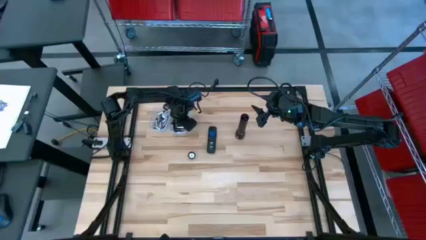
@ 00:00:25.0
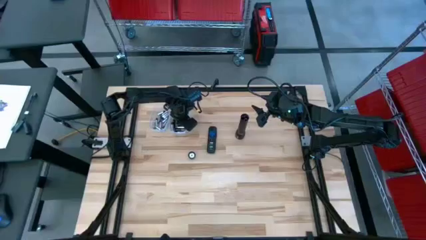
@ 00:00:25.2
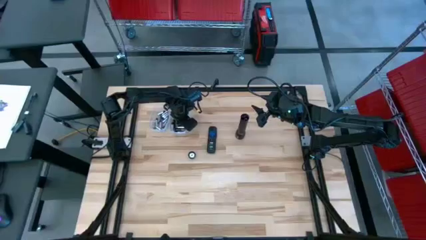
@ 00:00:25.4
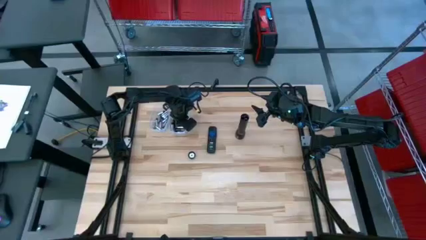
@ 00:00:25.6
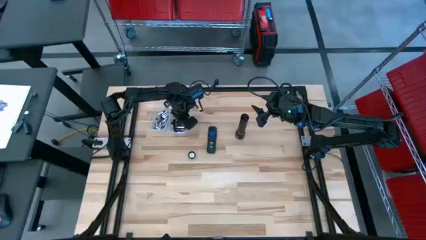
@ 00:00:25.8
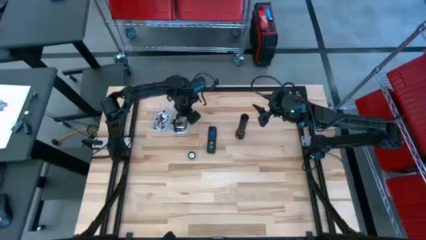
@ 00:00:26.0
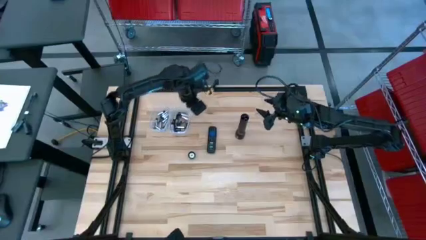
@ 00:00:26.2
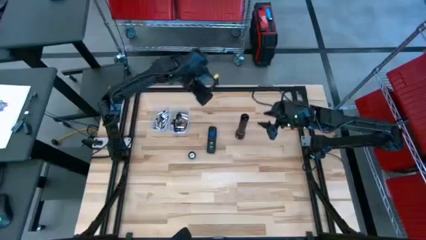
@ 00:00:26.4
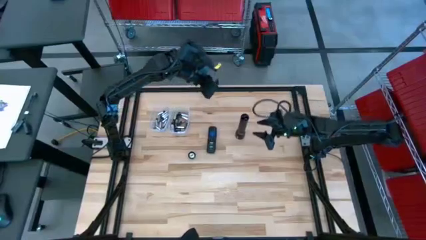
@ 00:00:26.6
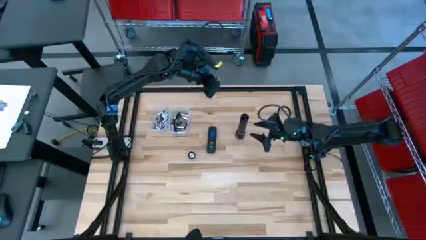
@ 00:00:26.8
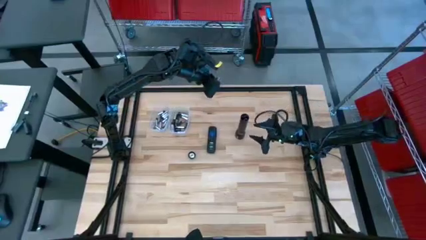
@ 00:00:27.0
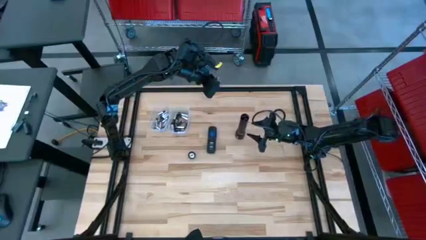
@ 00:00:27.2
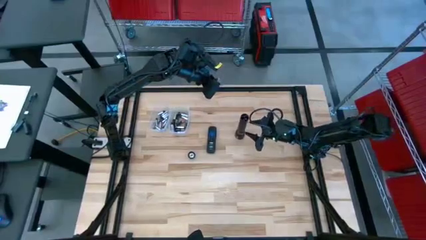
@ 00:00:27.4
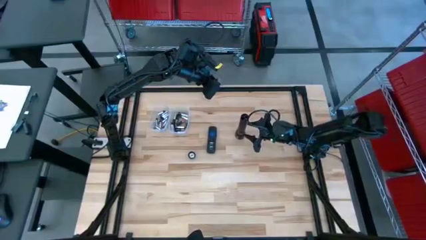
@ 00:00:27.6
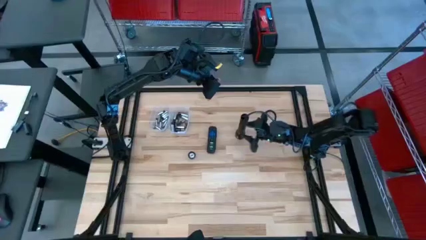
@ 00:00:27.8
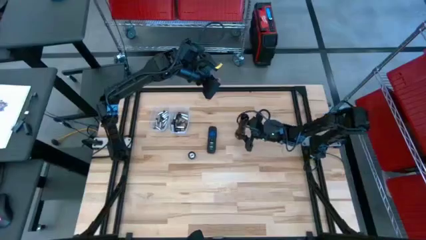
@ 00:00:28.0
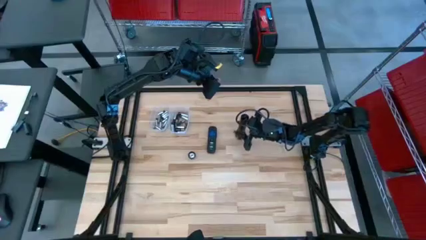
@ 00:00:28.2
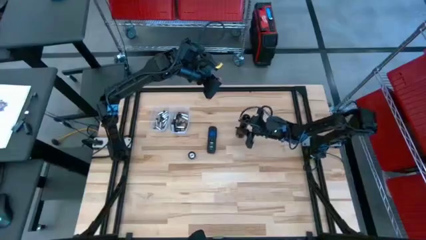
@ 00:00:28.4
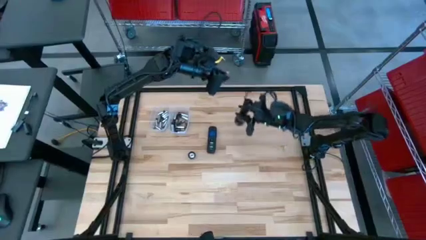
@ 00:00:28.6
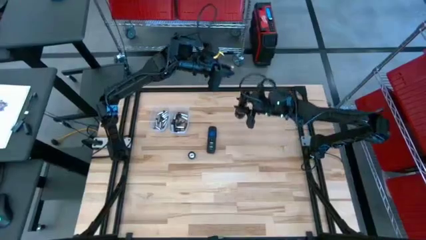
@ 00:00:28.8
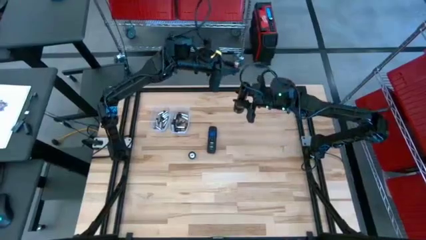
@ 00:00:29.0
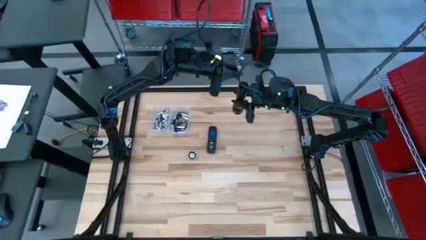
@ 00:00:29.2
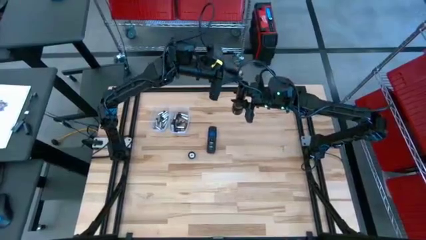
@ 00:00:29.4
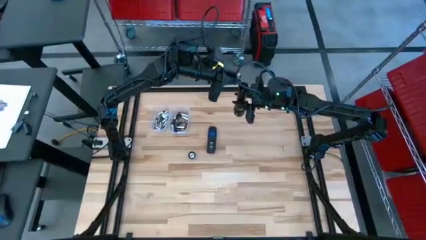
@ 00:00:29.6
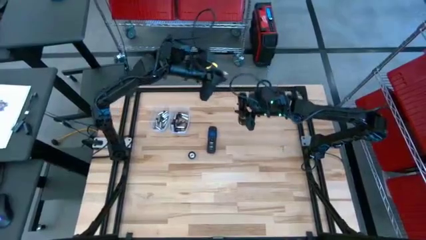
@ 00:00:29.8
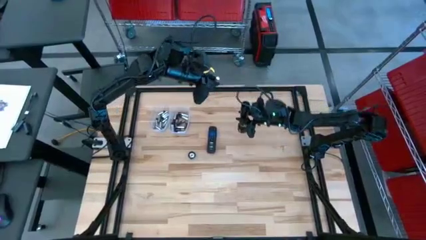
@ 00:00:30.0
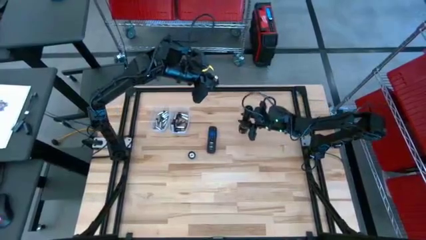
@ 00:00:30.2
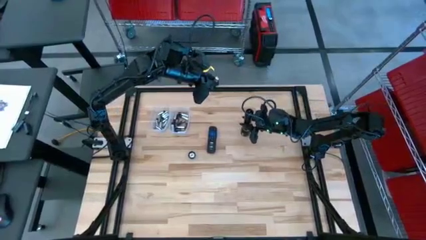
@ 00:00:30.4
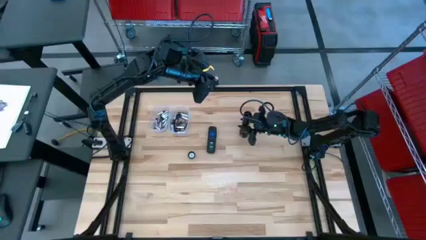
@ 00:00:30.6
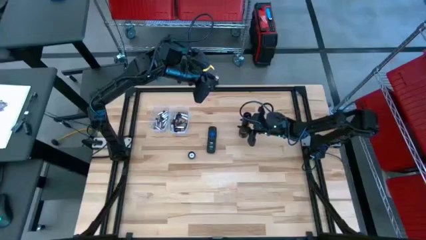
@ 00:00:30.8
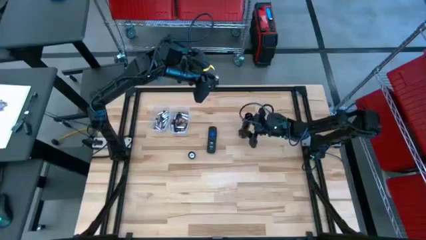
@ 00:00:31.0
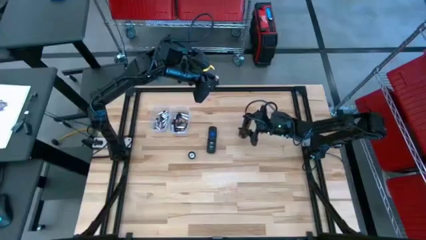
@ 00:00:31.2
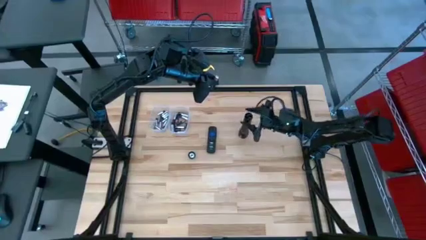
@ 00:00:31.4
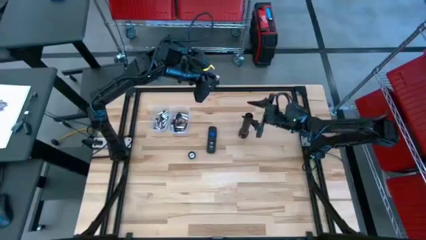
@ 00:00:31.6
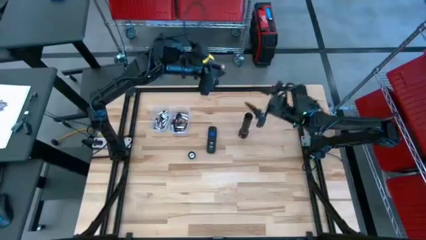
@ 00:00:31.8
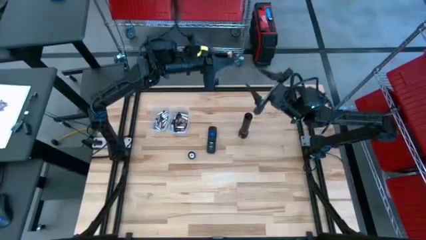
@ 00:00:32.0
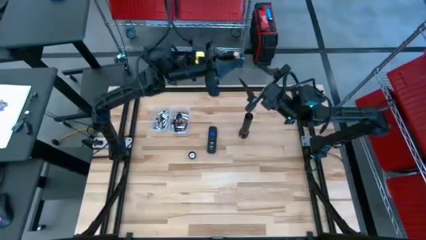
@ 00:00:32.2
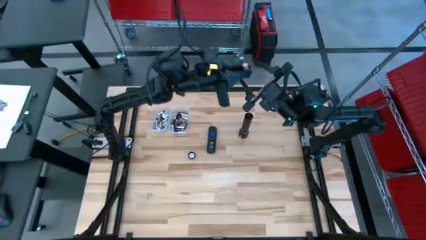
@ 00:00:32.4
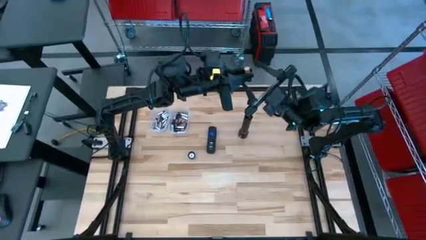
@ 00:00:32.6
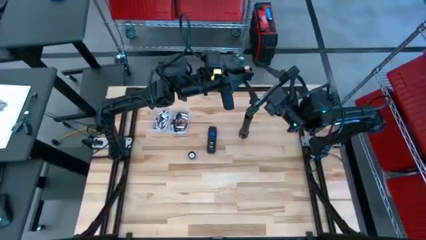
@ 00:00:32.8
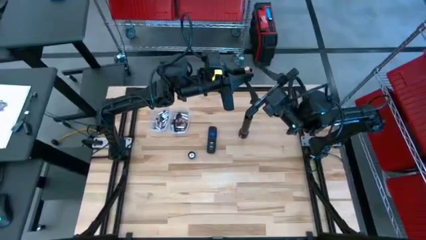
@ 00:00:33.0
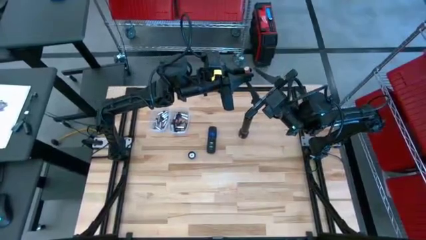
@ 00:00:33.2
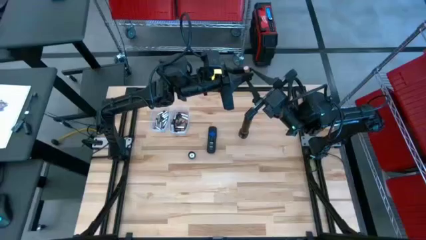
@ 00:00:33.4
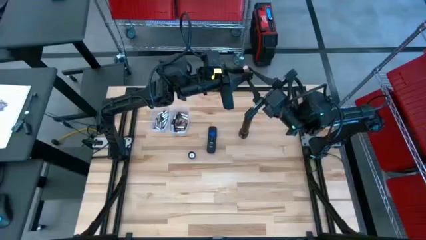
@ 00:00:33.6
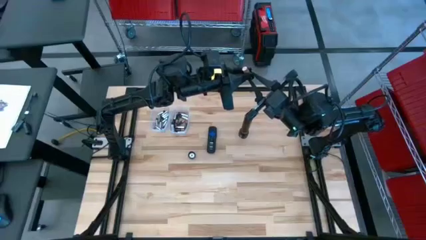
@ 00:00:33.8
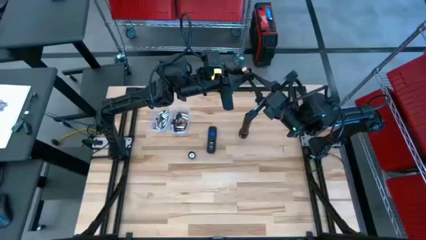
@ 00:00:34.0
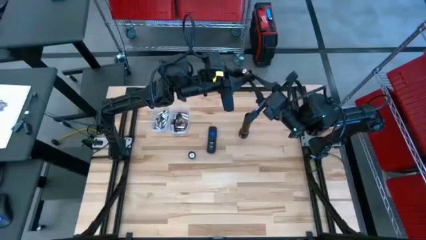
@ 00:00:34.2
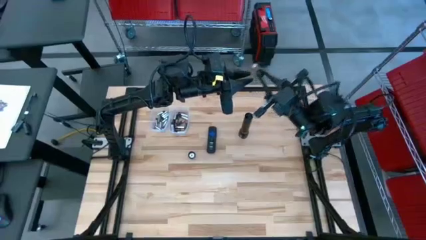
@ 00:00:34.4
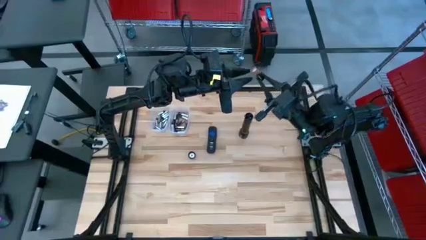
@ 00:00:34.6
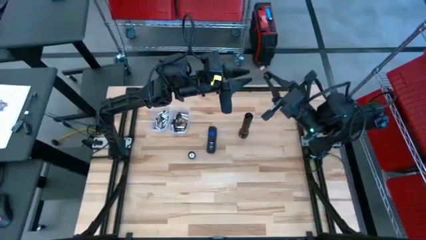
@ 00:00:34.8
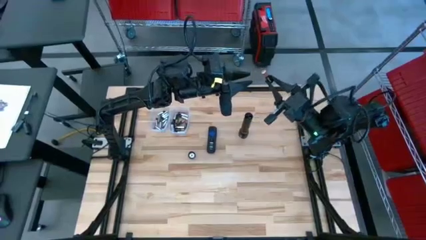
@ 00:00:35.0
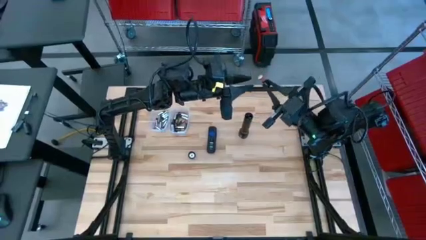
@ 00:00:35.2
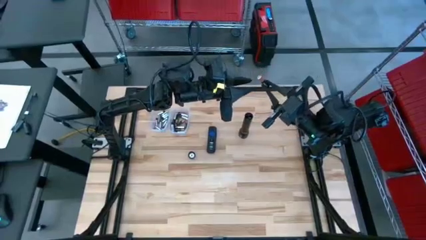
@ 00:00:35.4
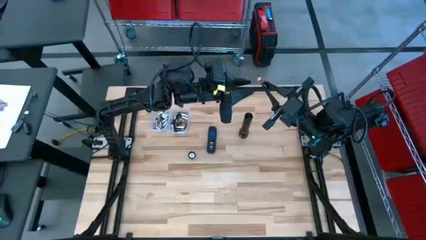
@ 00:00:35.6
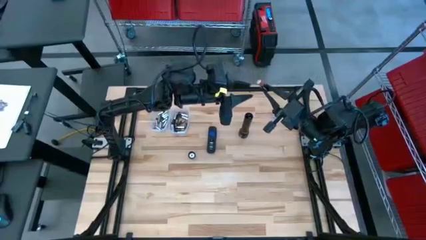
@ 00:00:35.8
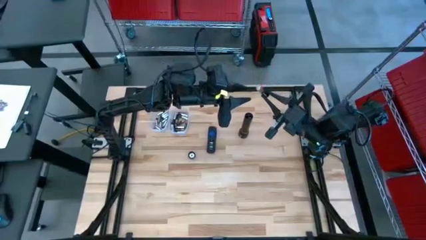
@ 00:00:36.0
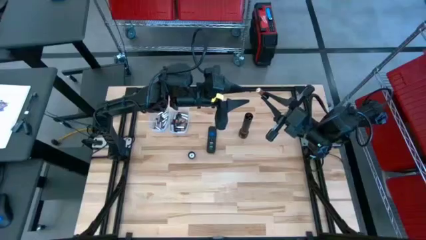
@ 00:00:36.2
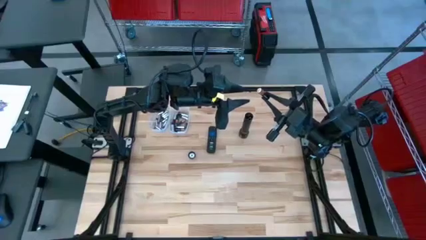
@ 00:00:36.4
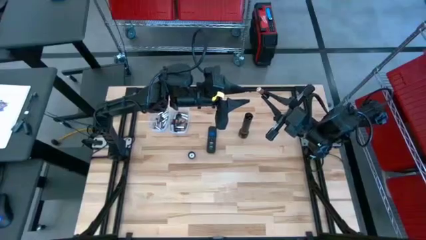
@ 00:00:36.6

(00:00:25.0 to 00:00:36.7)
Task: Insert battery
Insert the brown battery into the flashlight battery compartment

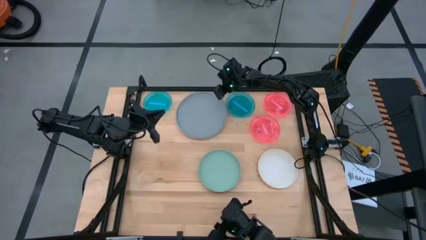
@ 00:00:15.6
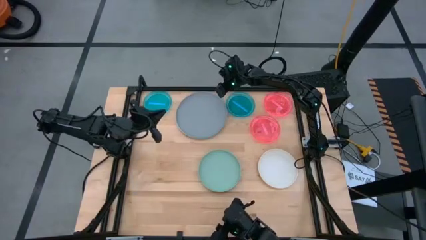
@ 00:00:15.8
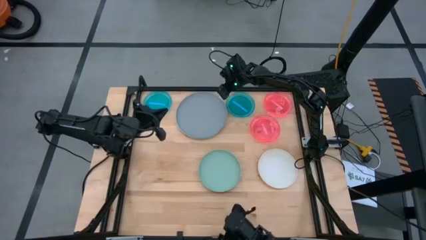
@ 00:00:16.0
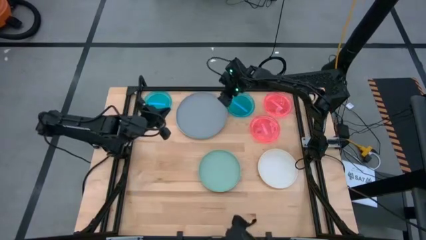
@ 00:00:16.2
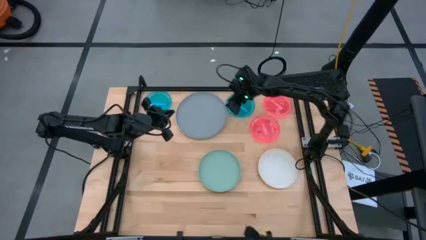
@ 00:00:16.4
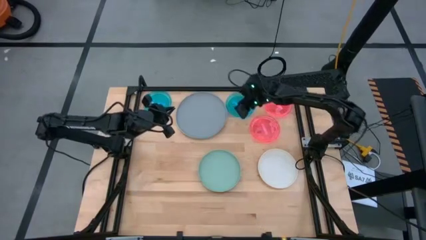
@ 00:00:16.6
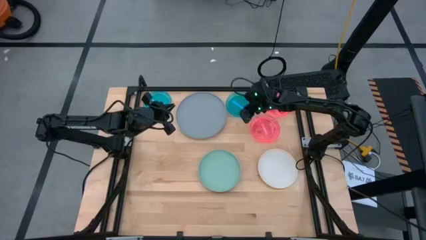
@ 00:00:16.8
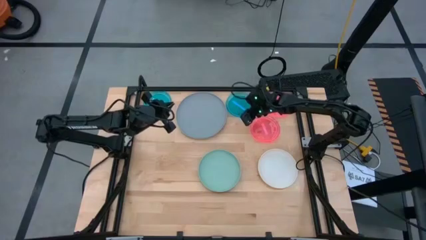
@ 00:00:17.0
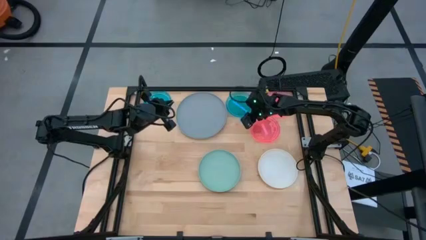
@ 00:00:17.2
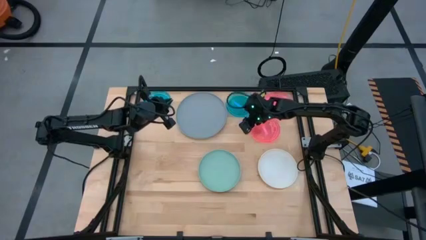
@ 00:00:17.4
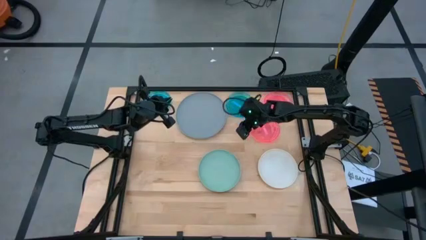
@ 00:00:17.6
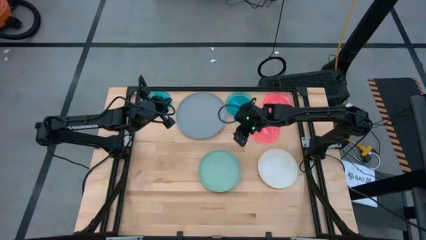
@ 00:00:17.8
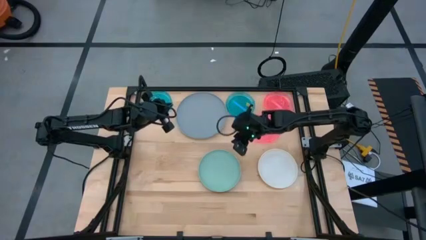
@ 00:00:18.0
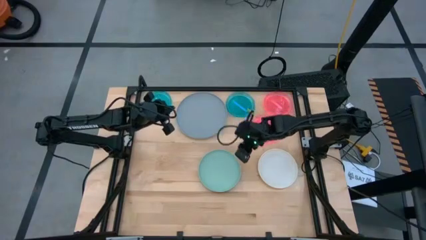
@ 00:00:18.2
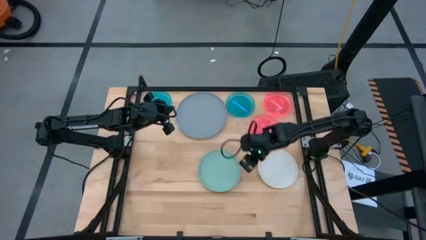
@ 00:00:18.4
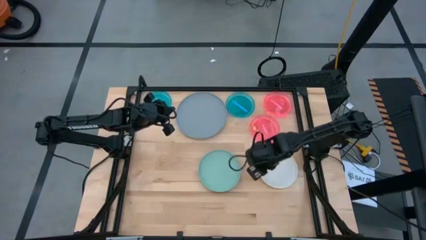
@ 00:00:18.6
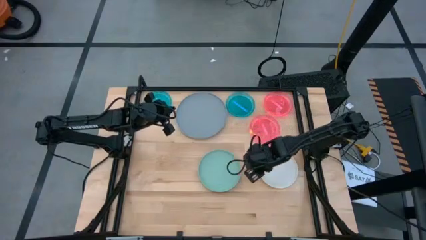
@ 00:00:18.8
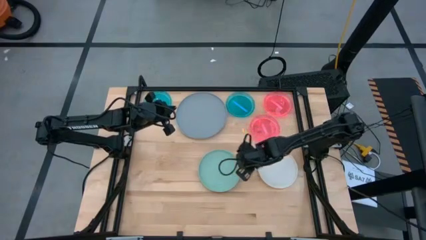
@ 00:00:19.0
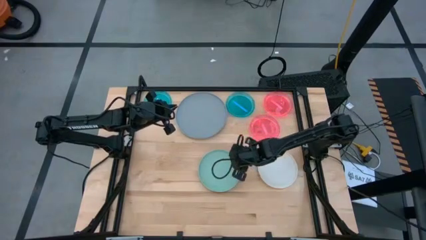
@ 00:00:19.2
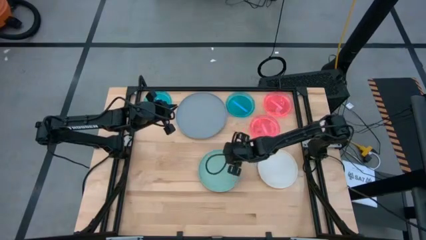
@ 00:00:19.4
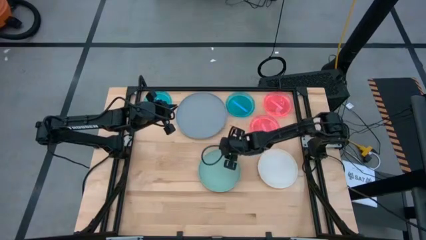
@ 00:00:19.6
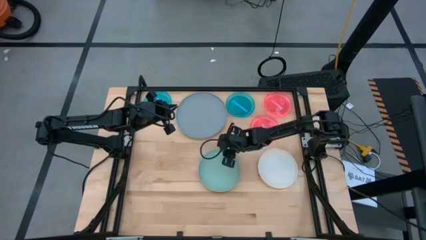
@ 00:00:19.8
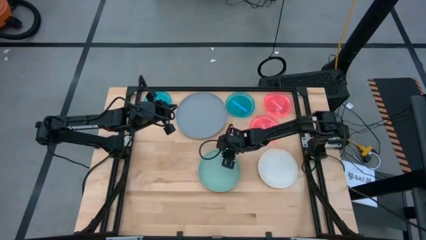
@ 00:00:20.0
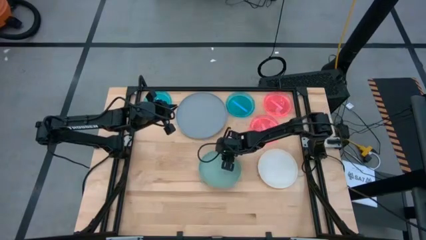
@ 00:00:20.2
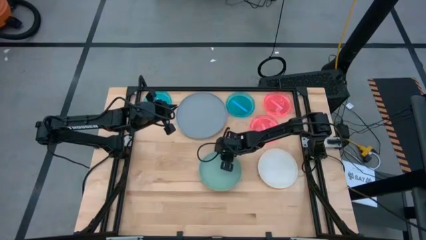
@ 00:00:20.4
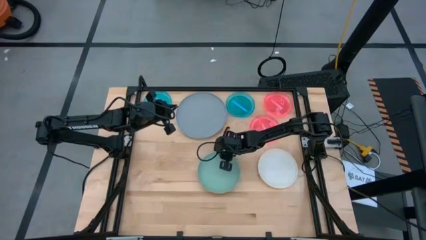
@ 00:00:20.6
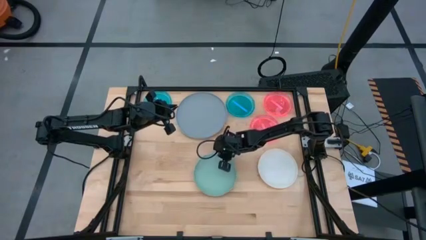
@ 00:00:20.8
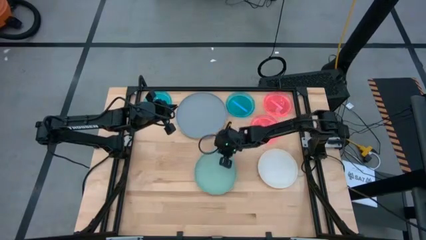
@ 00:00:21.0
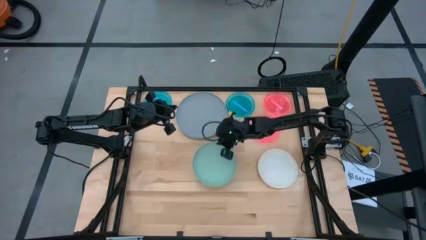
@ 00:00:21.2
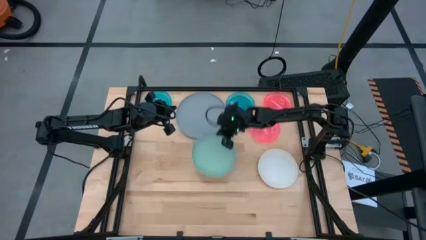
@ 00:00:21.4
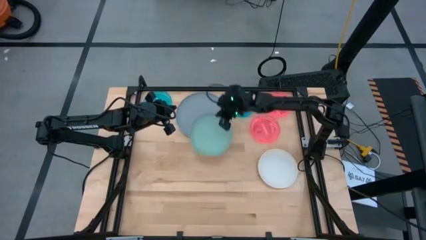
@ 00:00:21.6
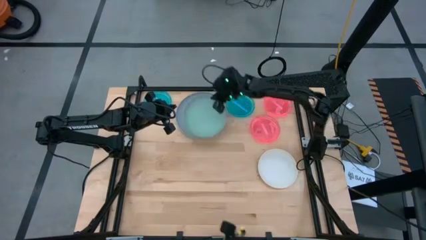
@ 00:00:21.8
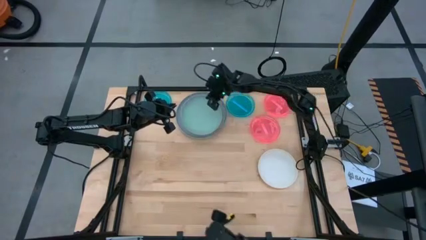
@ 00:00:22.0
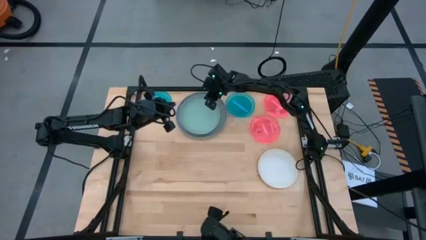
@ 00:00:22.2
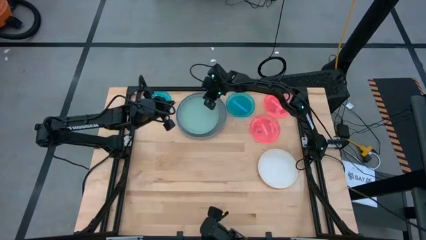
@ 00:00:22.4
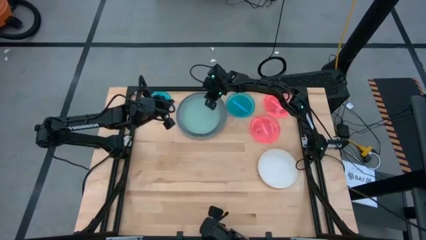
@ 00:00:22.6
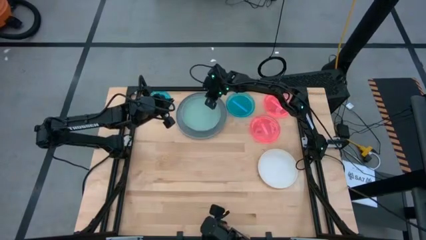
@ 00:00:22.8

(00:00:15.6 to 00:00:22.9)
Task: Stack plastic plates
Stack the light green plate on top of the gray plate
